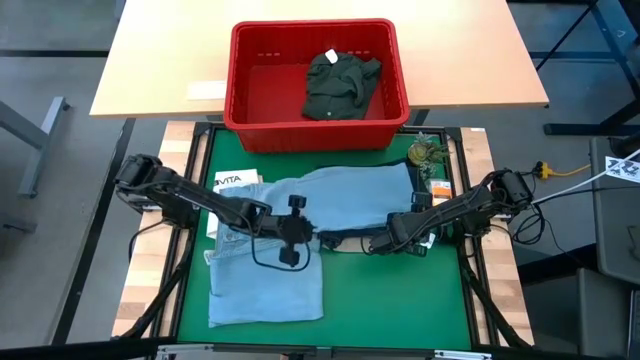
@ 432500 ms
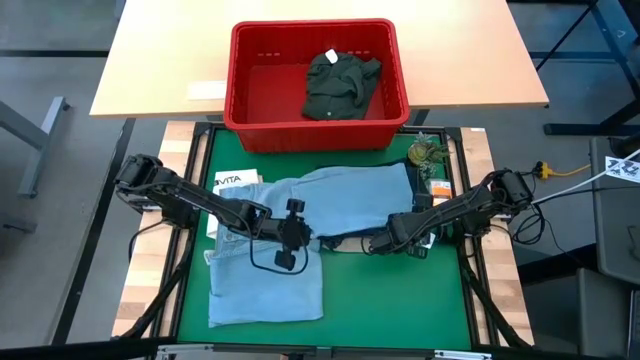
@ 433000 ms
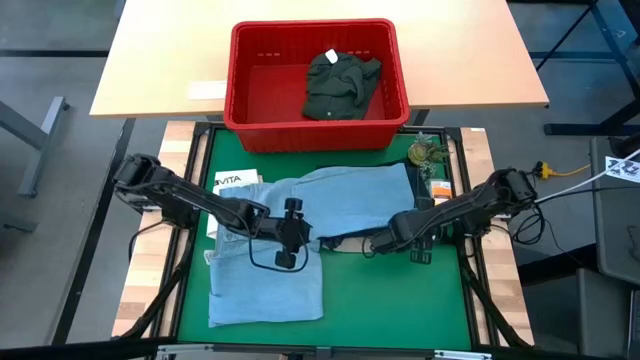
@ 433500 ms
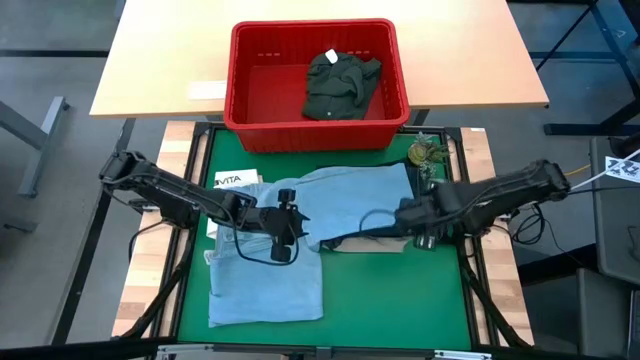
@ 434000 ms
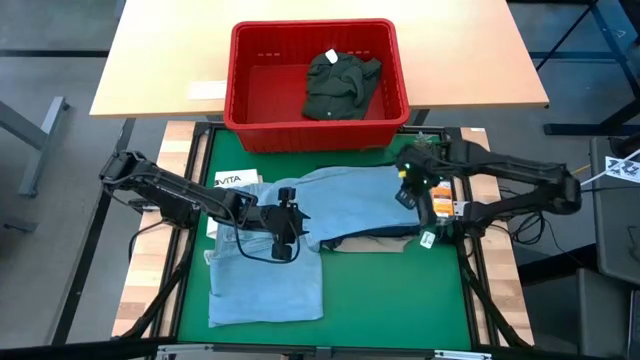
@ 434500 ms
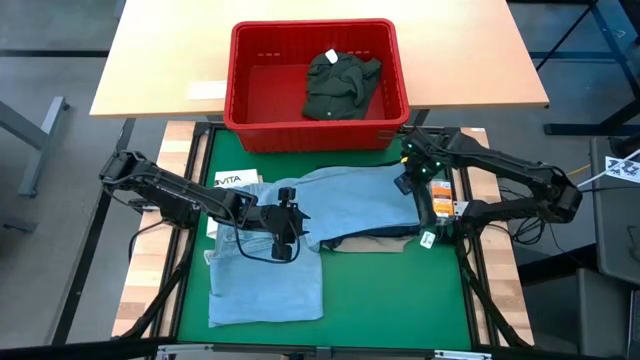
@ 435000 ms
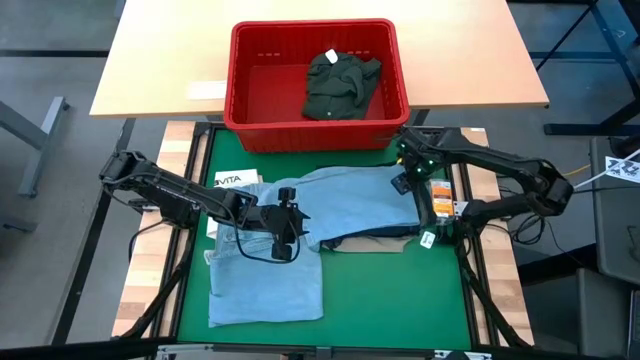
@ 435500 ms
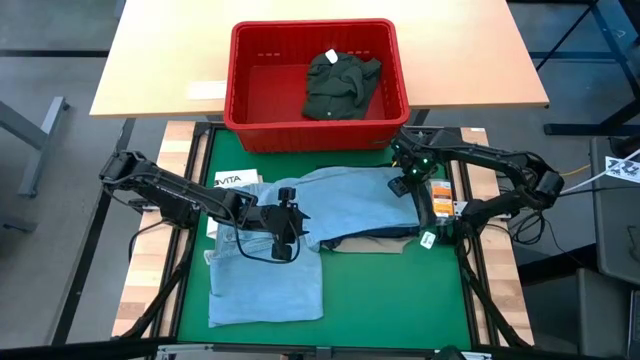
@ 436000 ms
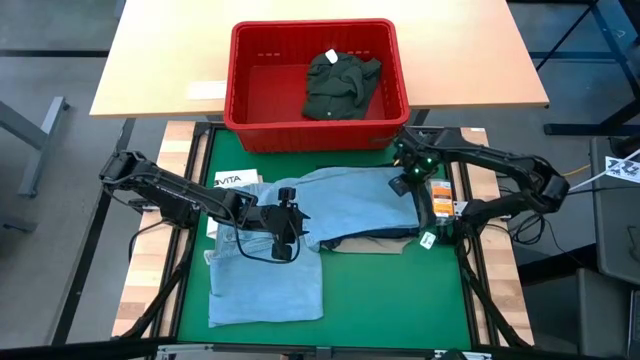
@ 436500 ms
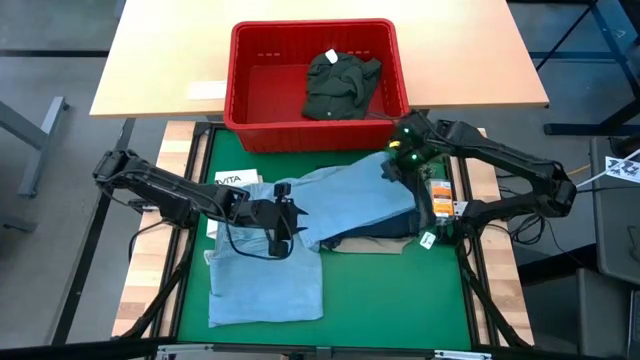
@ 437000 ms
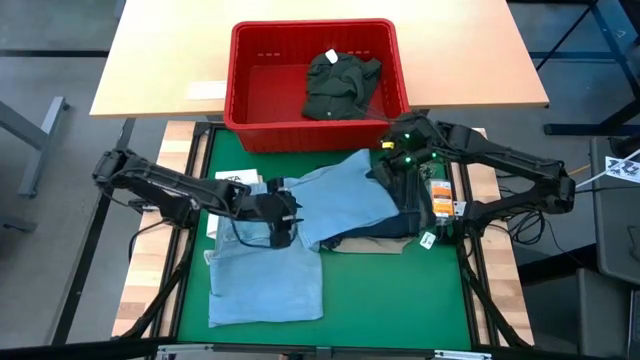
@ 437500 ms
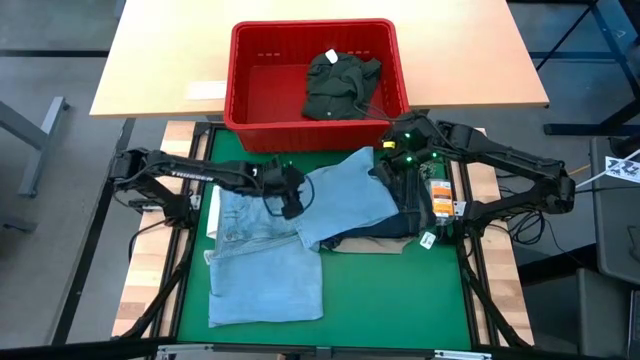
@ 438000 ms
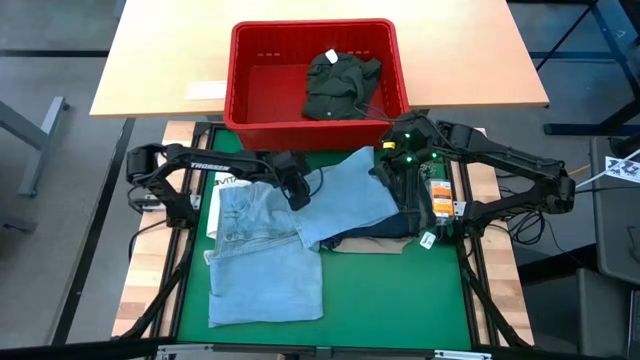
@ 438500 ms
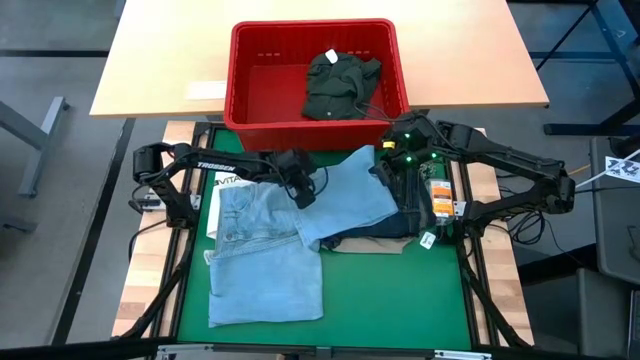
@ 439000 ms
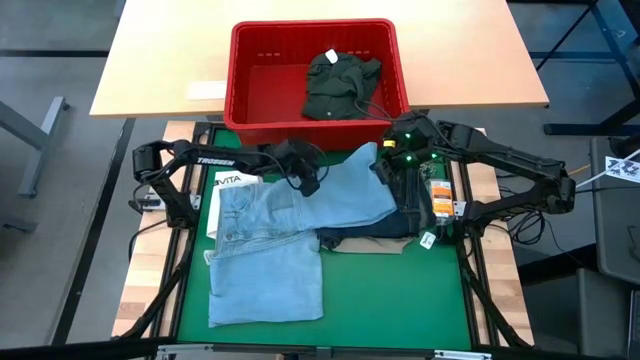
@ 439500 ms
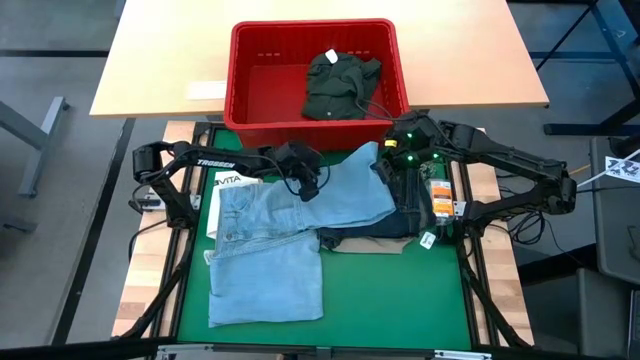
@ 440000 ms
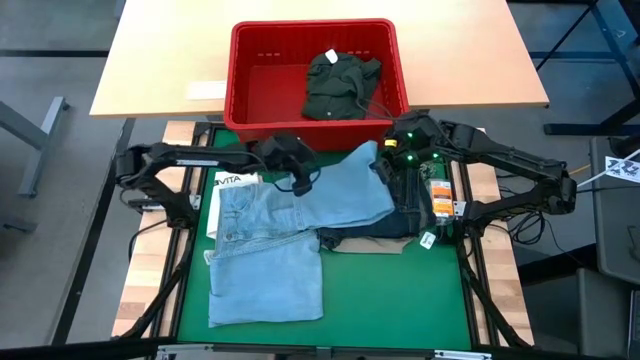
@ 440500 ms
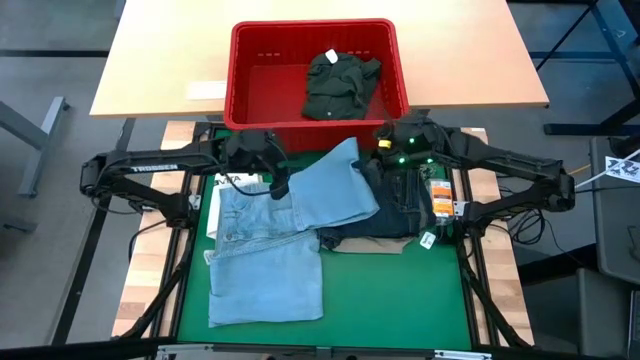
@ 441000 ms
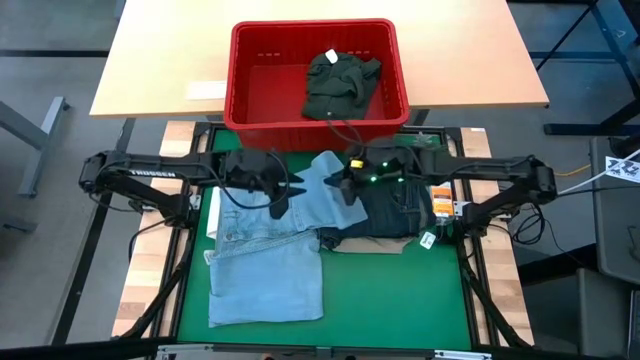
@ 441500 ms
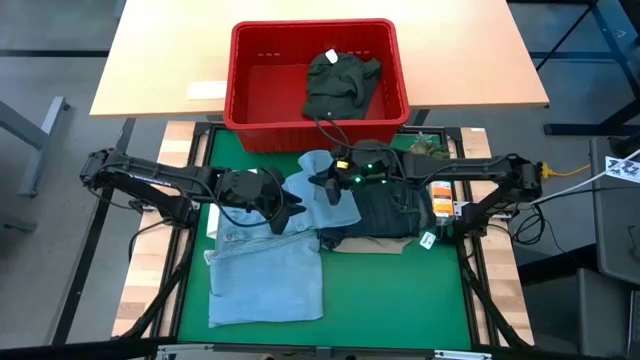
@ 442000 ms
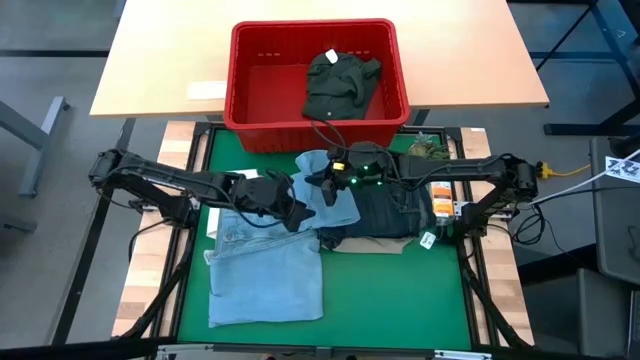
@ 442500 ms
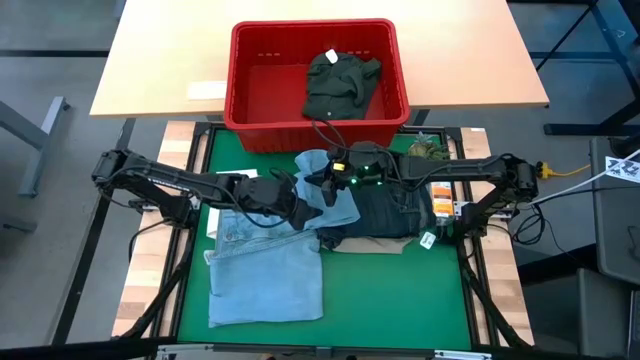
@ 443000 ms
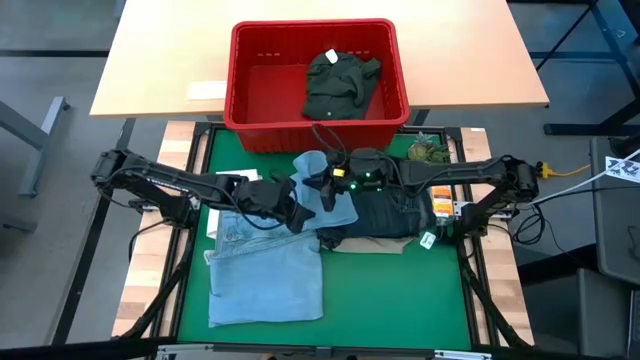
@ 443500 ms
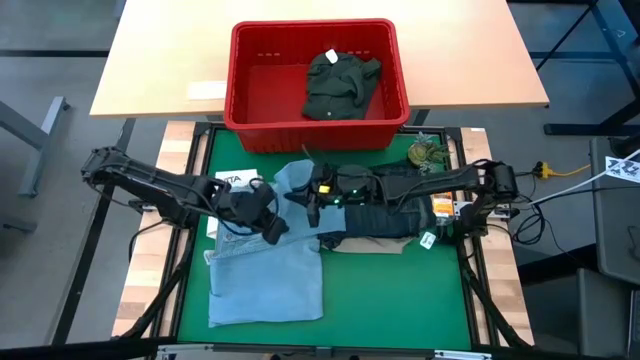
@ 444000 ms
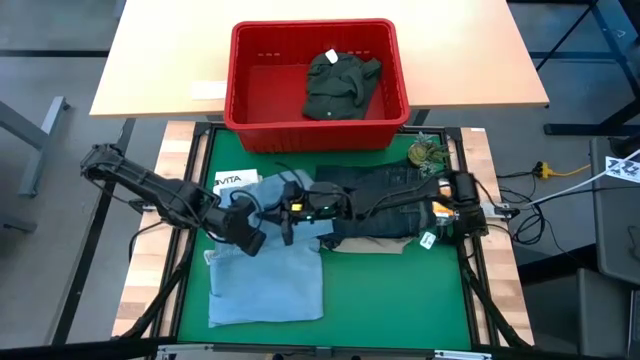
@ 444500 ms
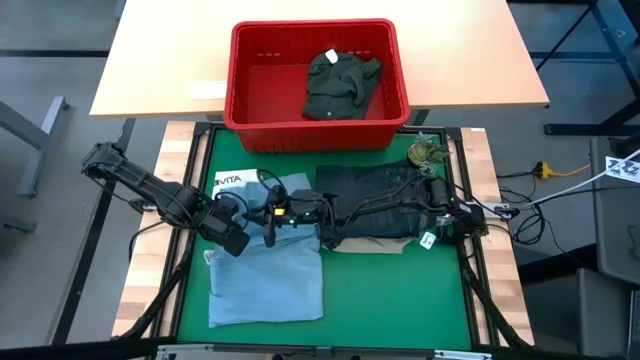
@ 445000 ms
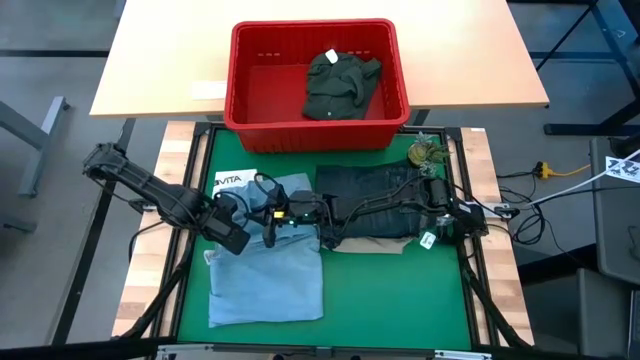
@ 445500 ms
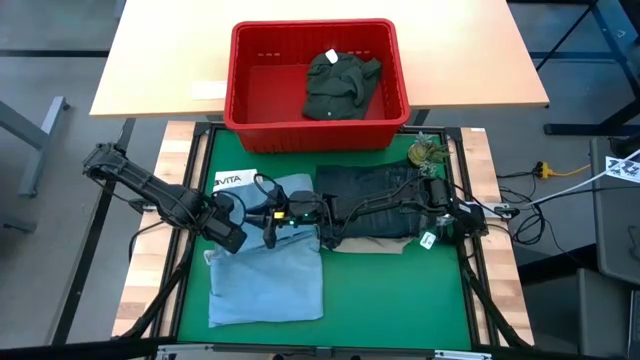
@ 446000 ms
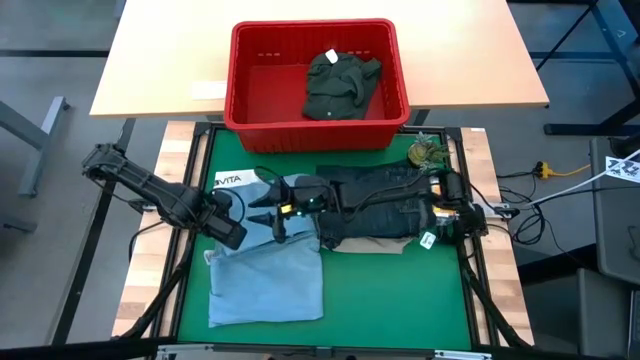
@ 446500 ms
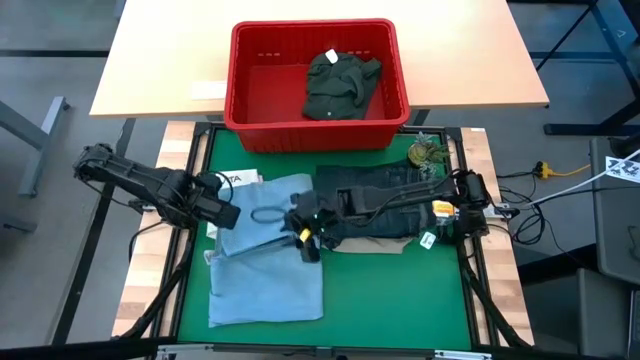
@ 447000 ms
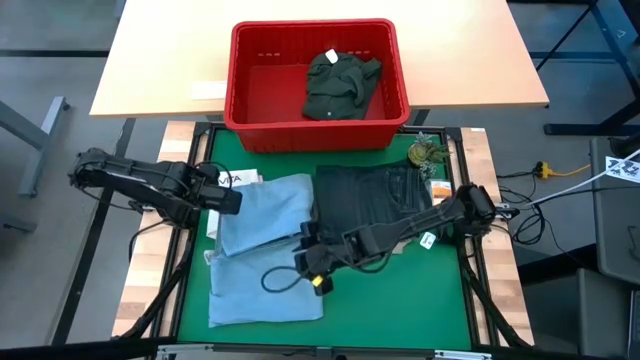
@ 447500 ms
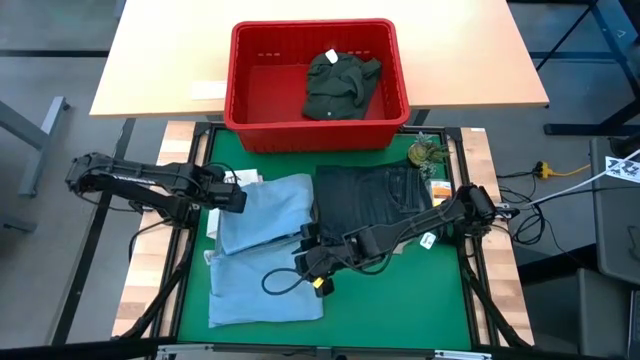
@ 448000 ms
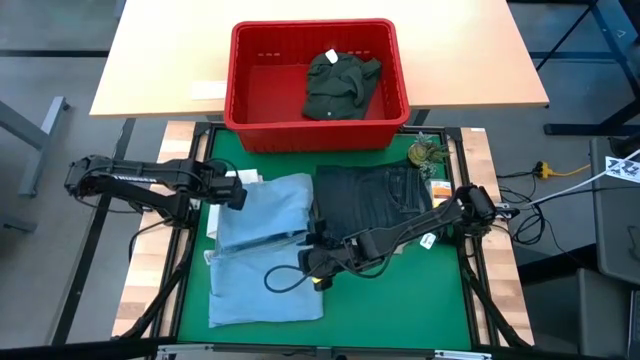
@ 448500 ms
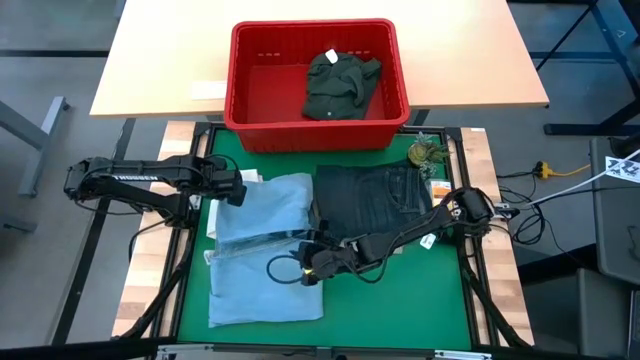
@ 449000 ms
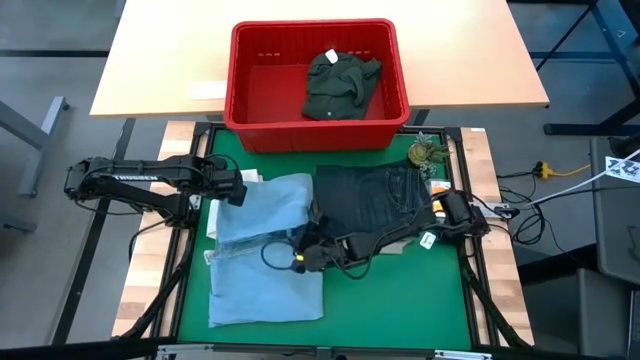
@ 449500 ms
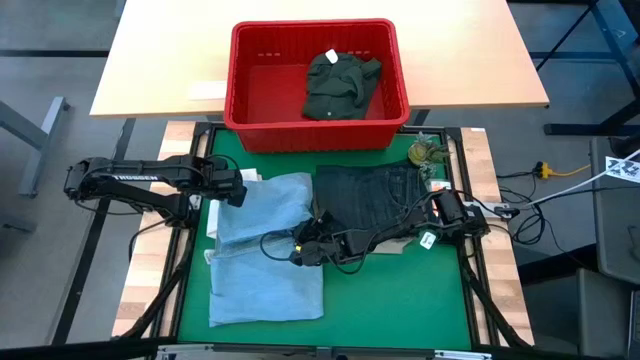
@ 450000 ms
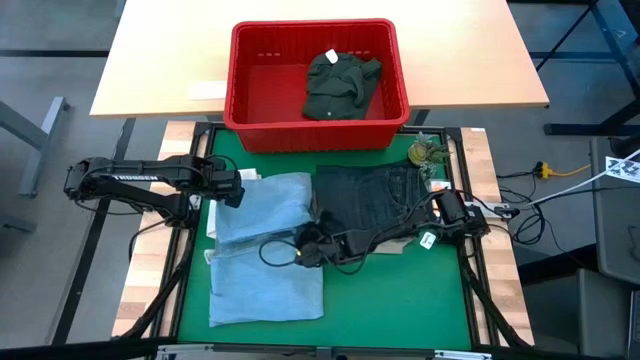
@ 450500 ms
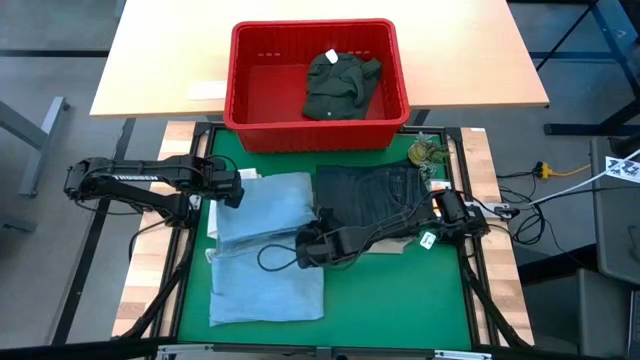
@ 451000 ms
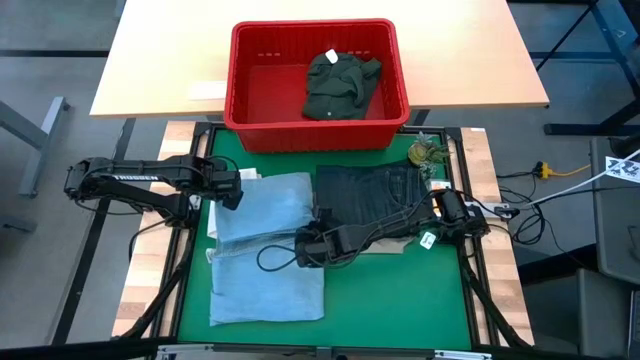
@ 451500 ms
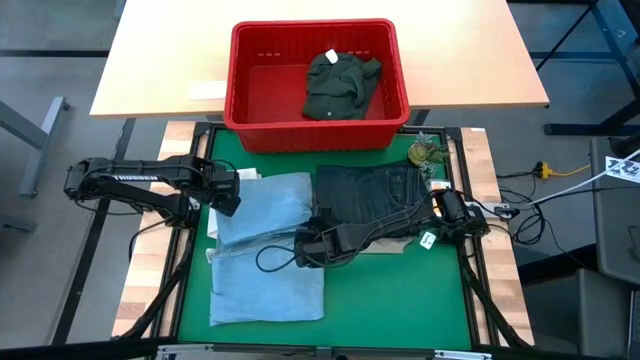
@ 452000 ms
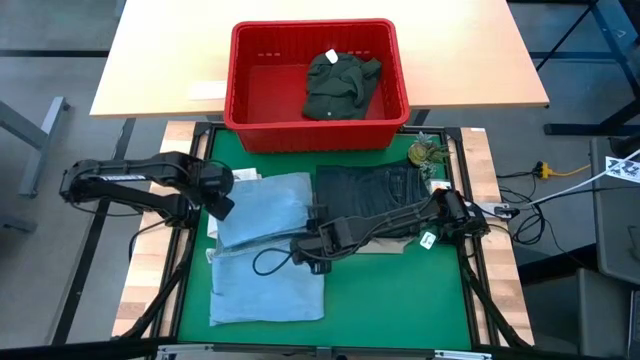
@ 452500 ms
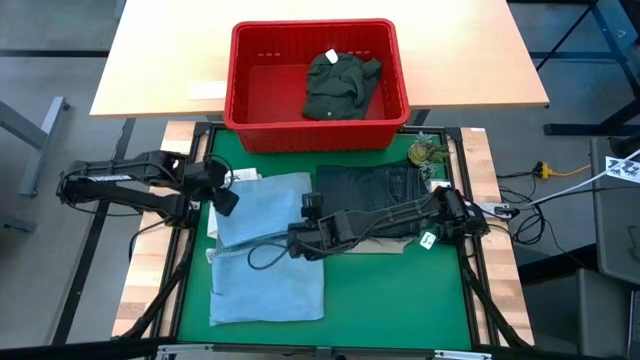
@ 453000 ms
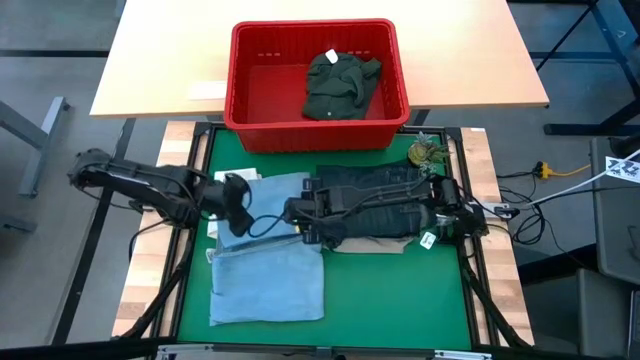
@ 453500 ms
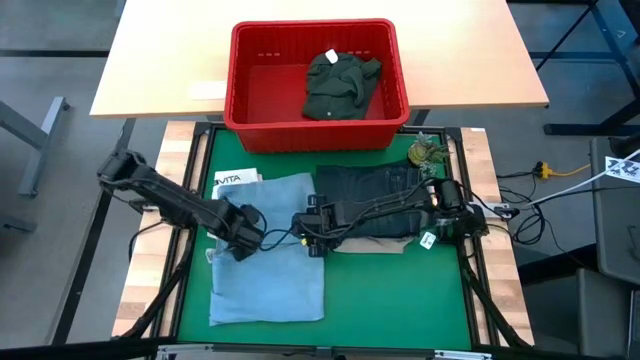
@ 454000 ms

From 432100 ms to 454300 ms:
Task: Fold Laundry from Bin
Fold the light blue jeans
